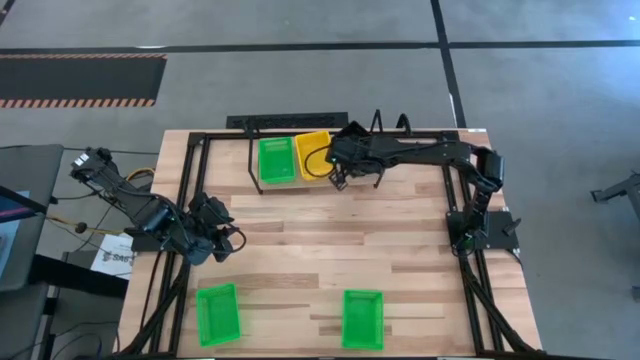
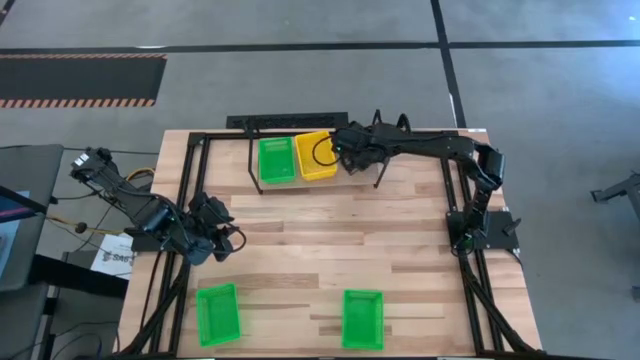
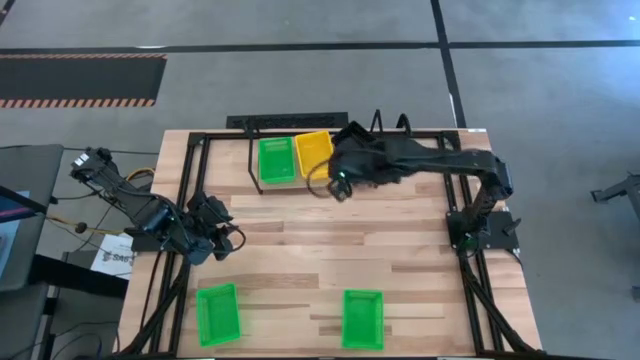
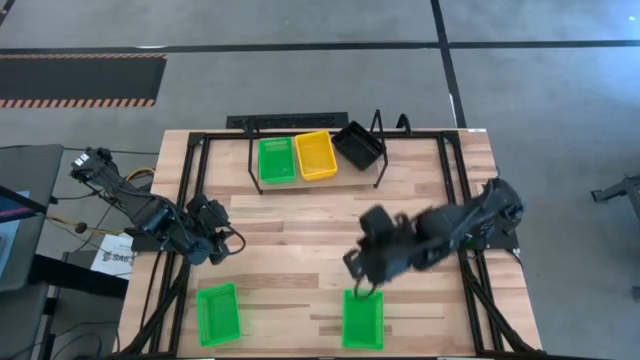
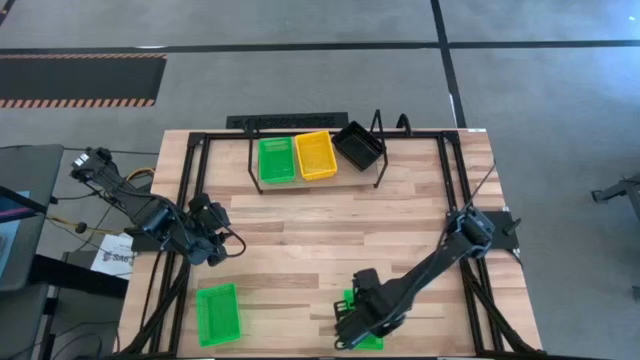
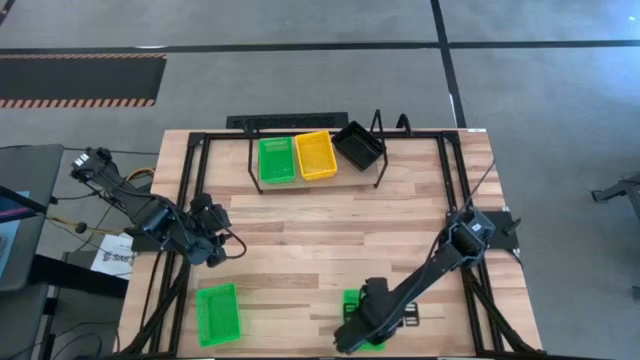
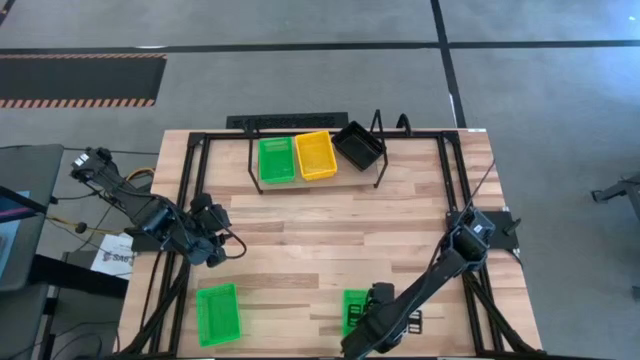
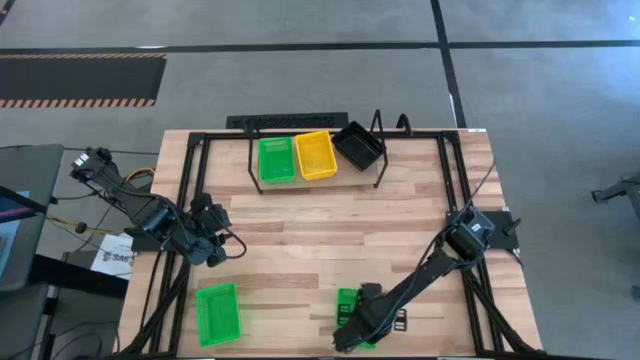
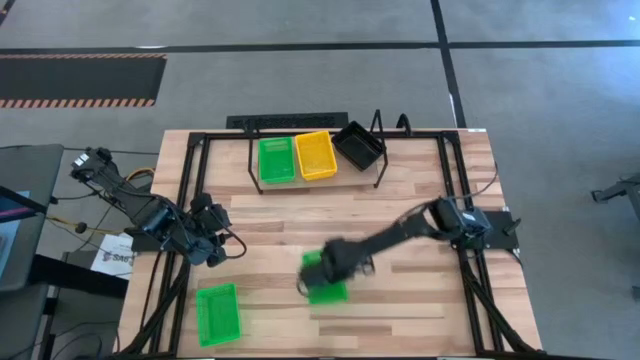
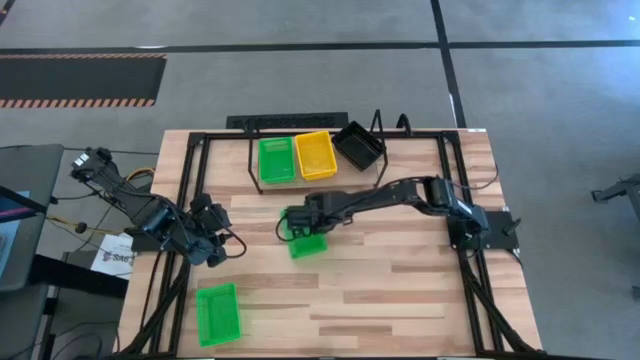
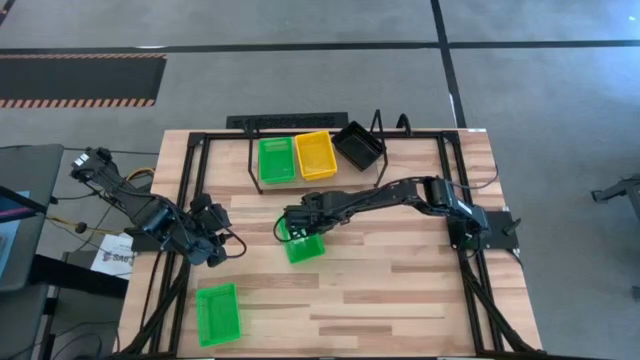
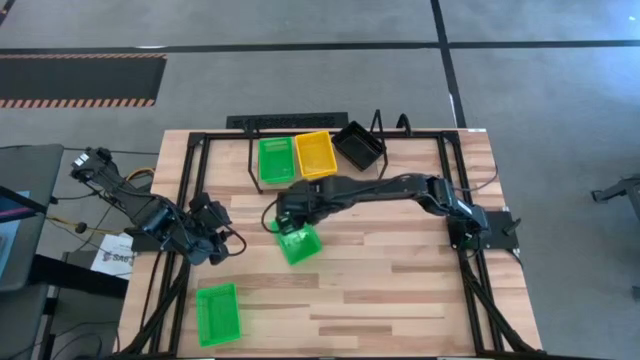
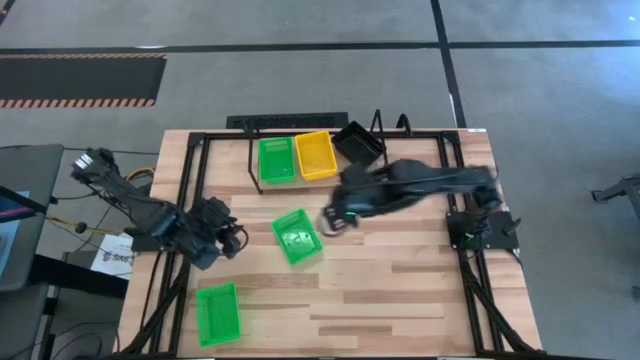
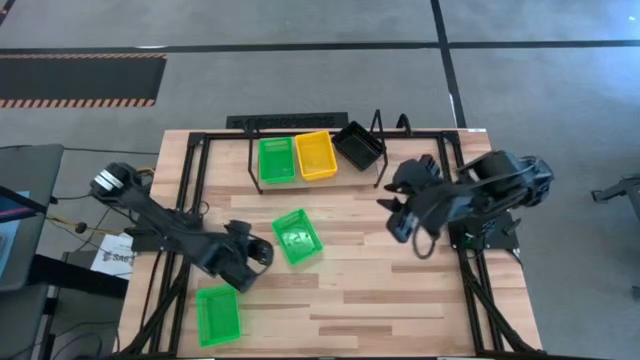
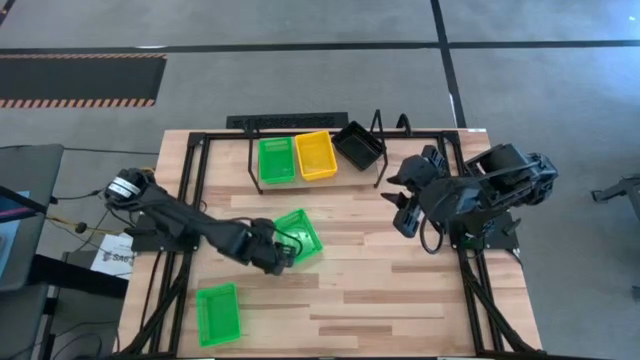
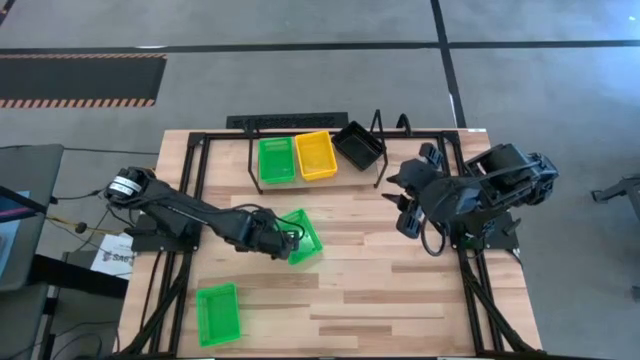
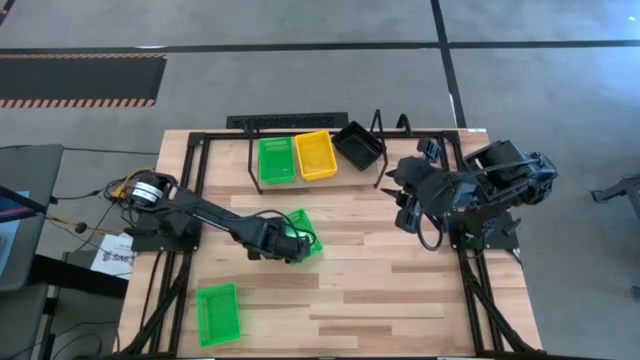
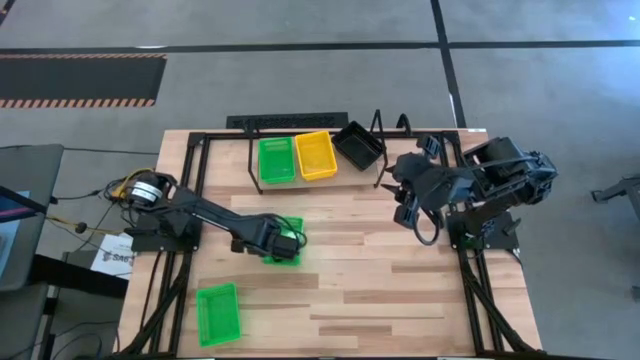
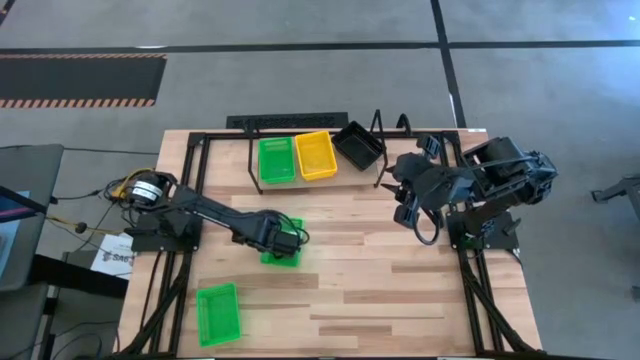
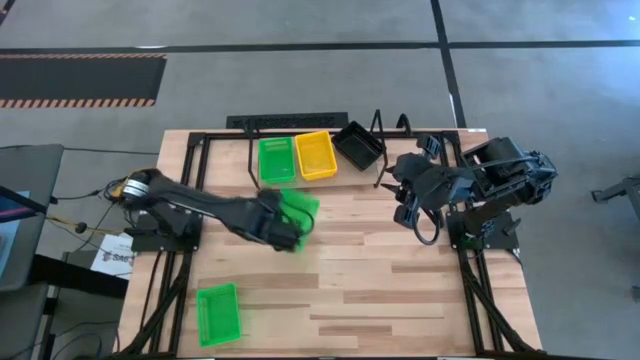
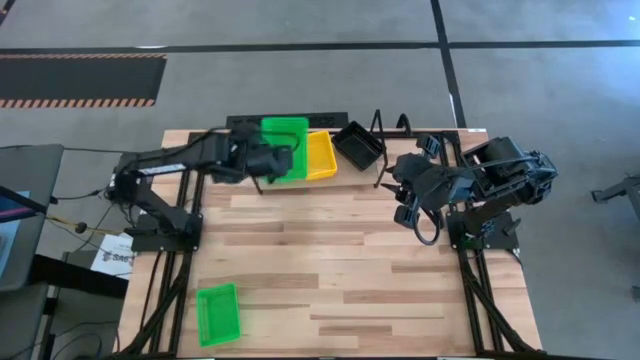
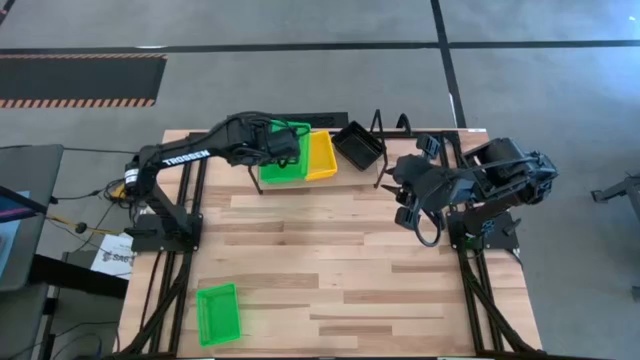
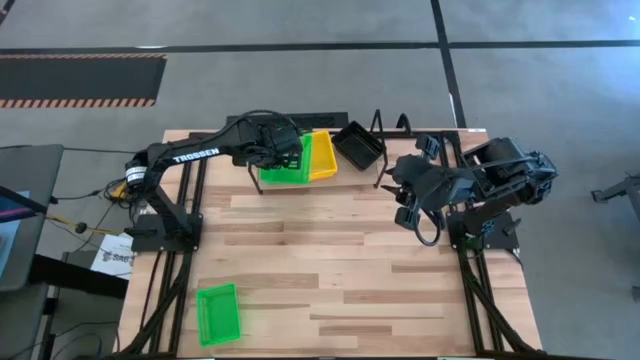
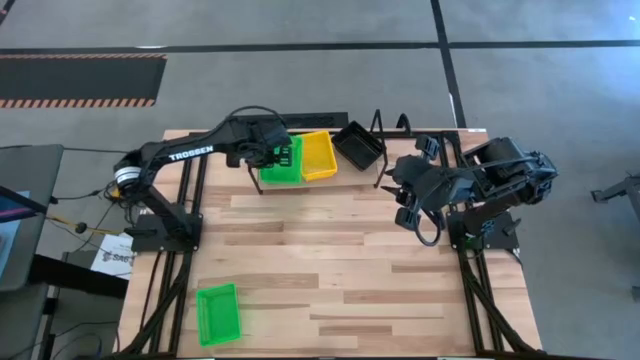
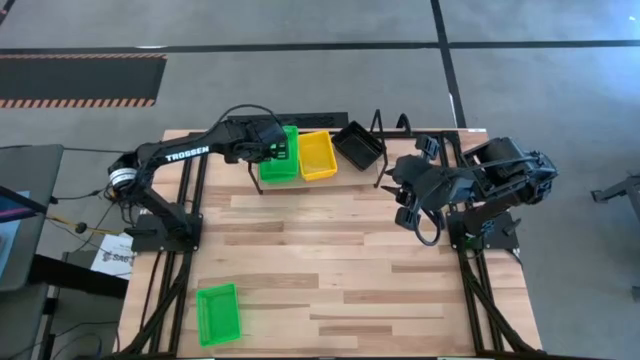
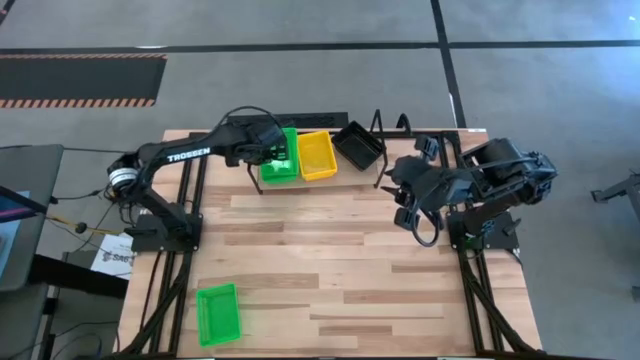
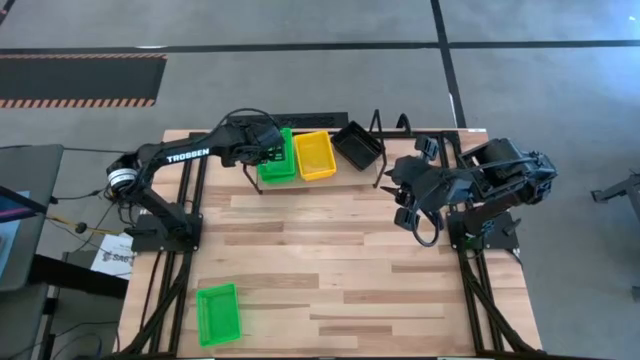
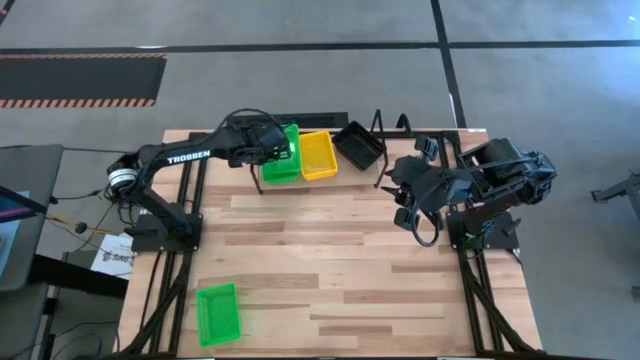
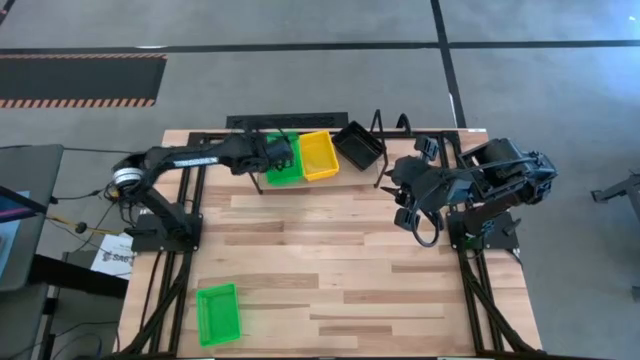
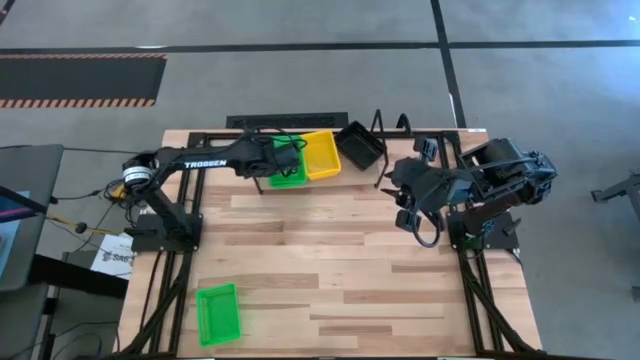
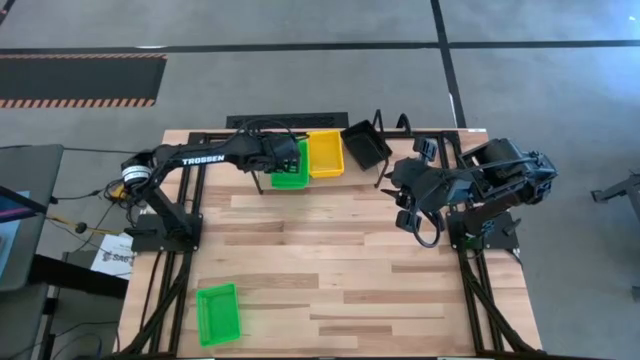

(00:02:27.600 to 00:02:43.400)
Task: Stack baskets on shelf by color
Stack the right green bin on top of the green bin on the shelf

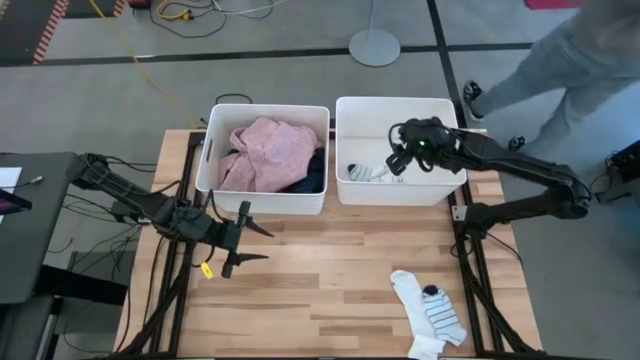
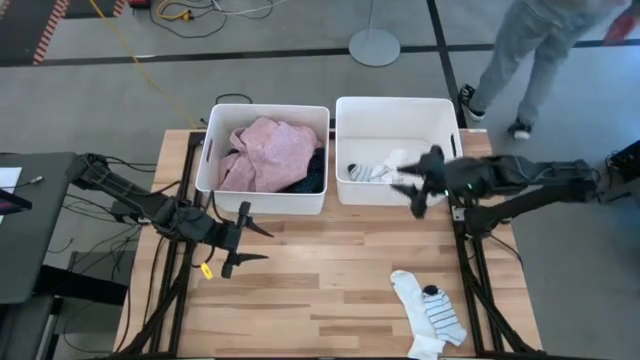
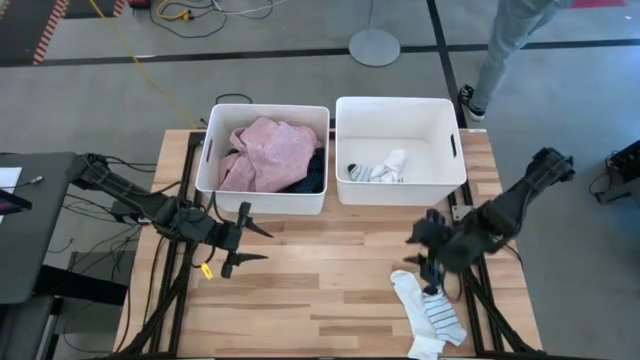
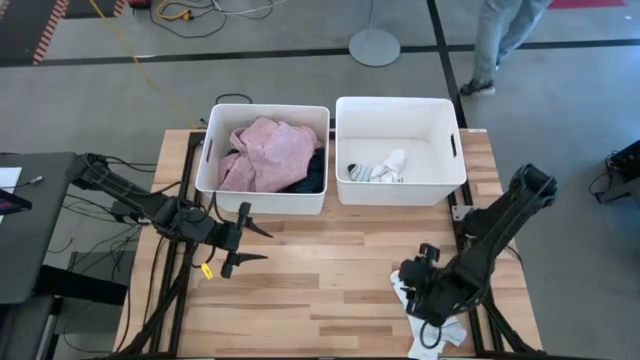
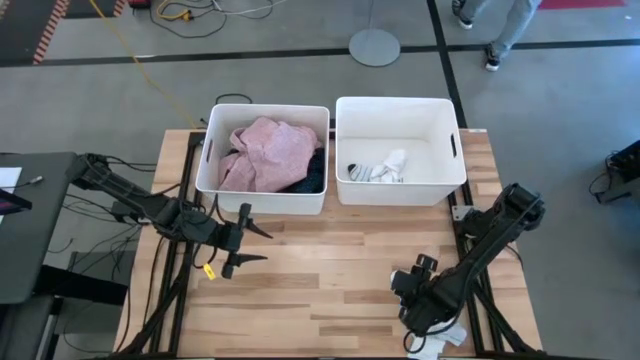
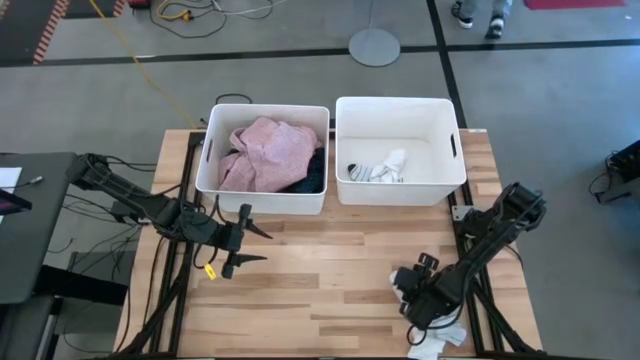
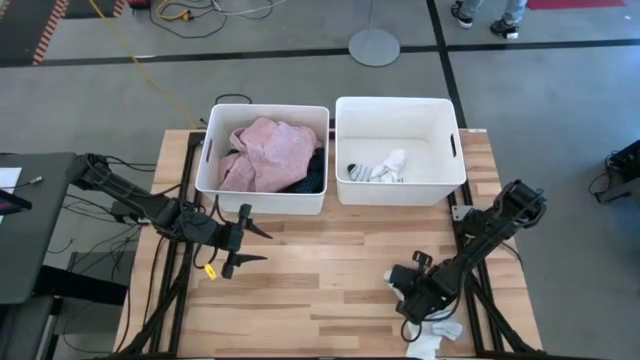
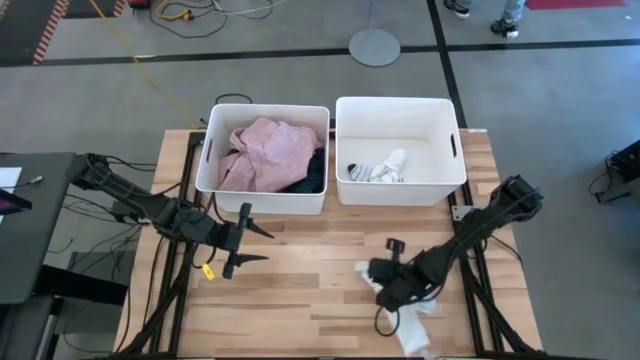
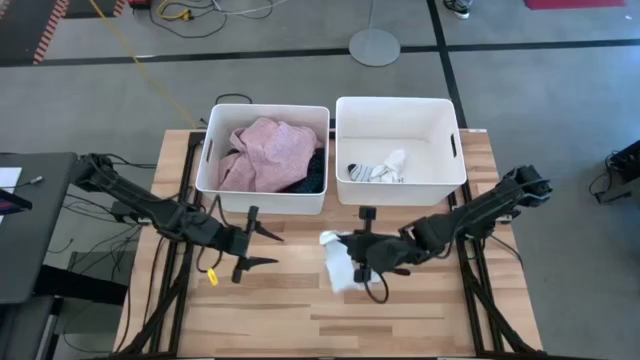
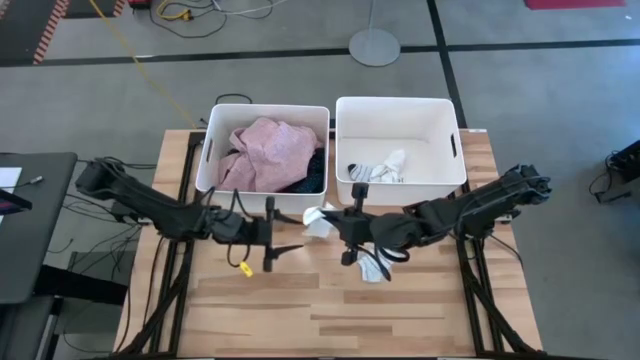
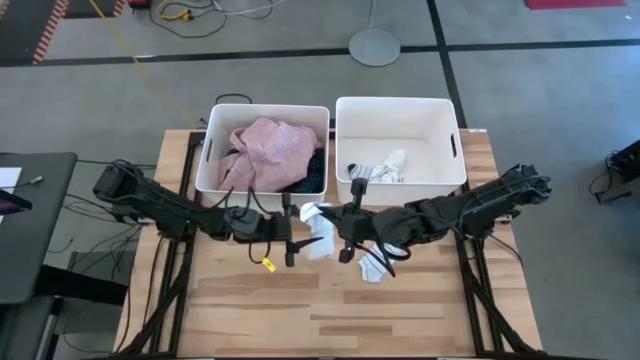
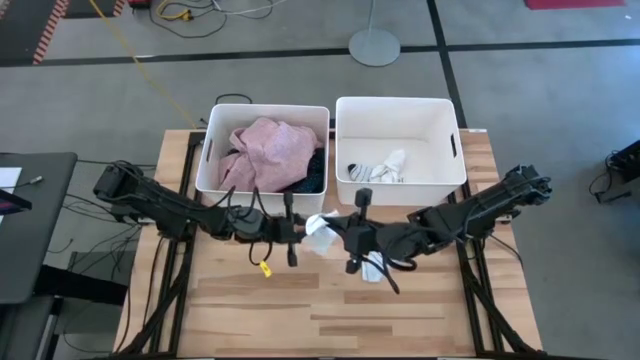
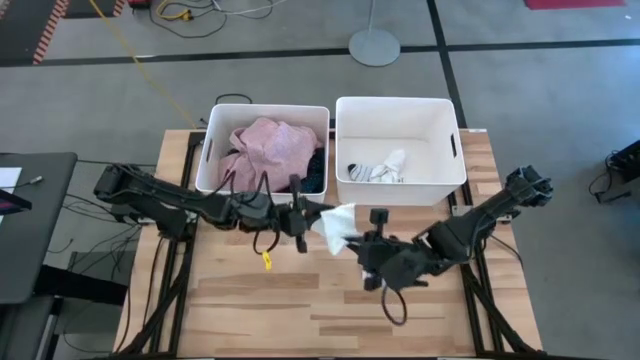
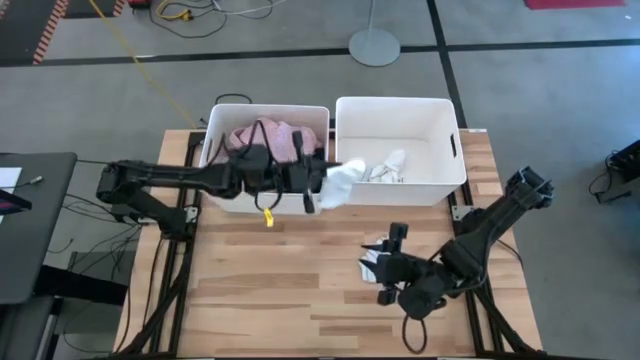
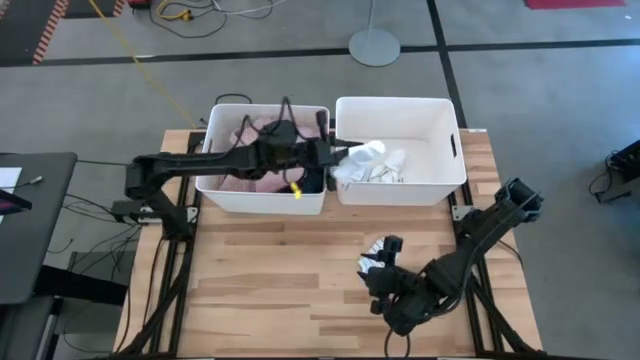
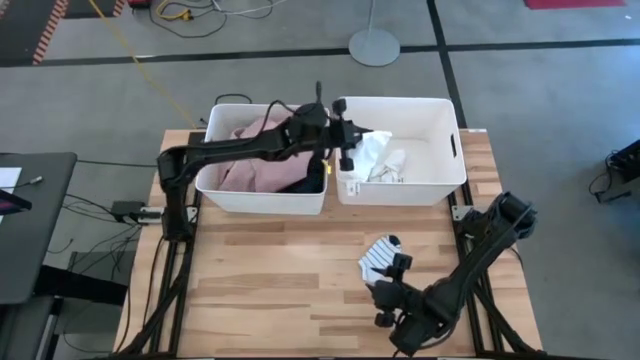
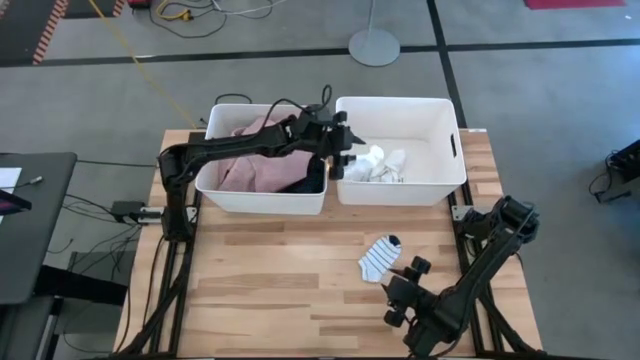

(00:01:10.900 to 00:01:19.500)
Task: Sort clothes
Put the white sock into the right white laundry bin
